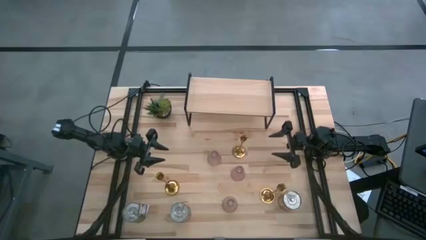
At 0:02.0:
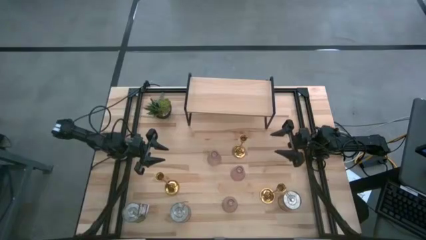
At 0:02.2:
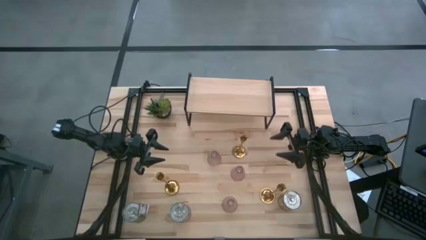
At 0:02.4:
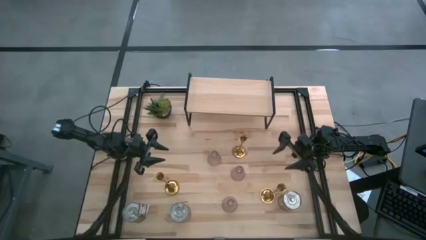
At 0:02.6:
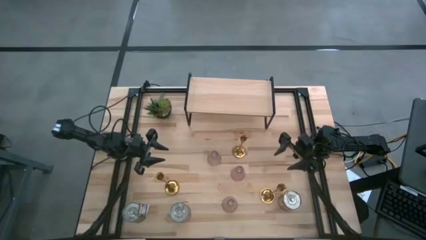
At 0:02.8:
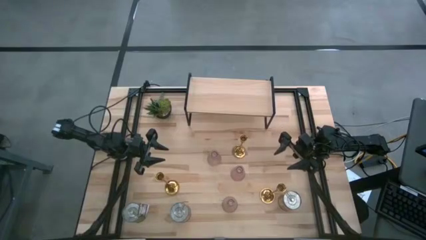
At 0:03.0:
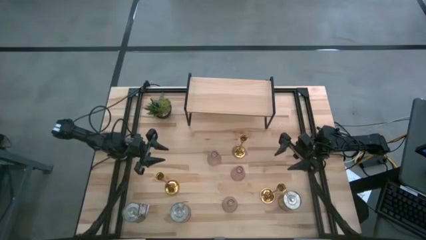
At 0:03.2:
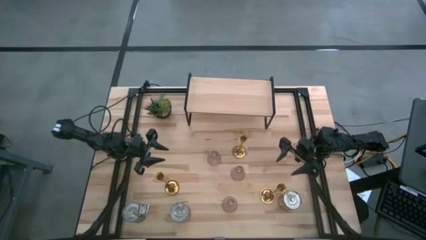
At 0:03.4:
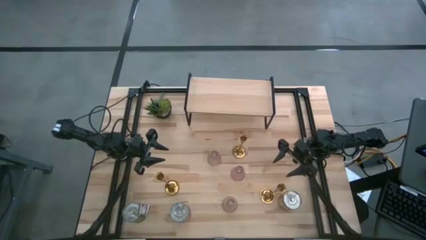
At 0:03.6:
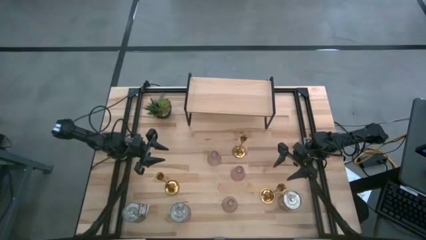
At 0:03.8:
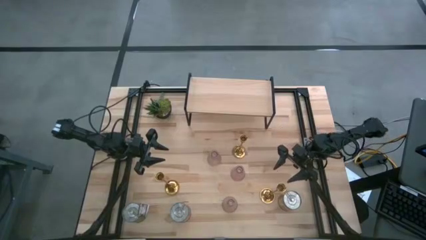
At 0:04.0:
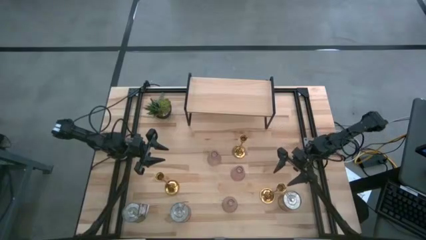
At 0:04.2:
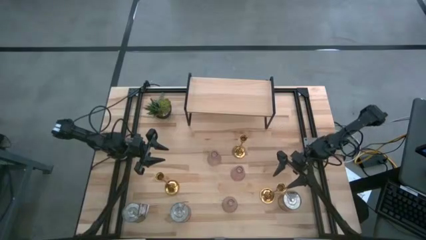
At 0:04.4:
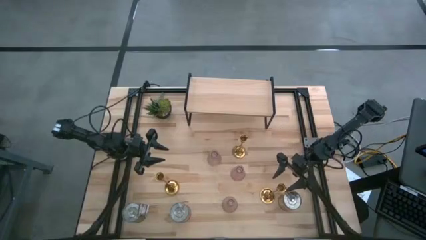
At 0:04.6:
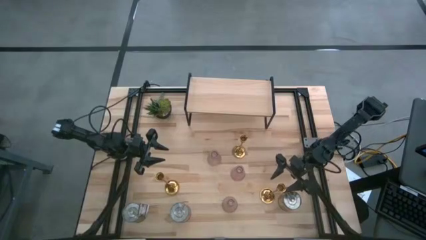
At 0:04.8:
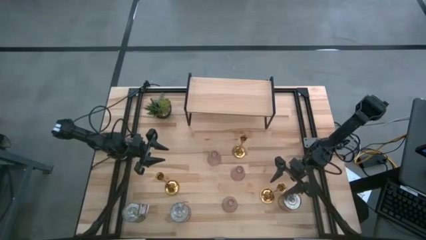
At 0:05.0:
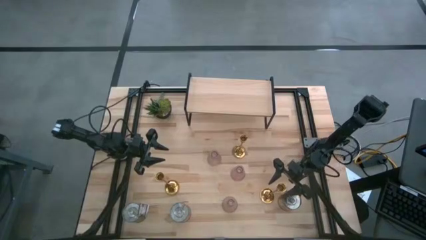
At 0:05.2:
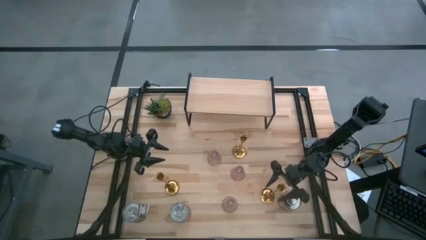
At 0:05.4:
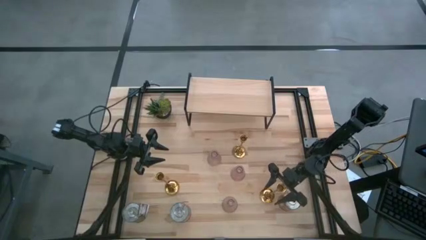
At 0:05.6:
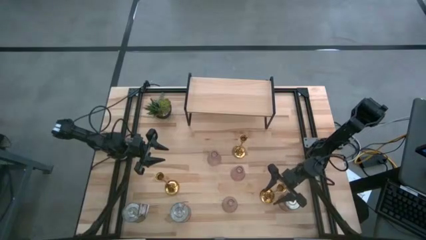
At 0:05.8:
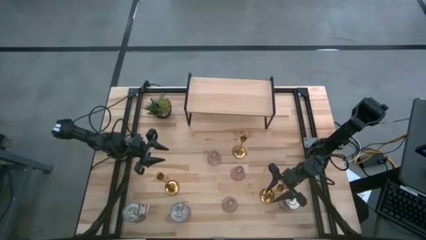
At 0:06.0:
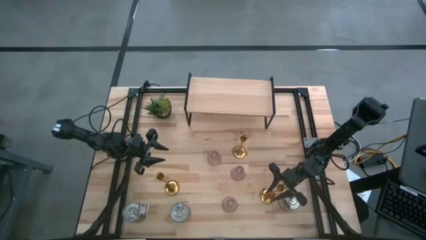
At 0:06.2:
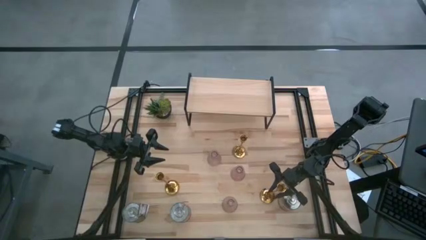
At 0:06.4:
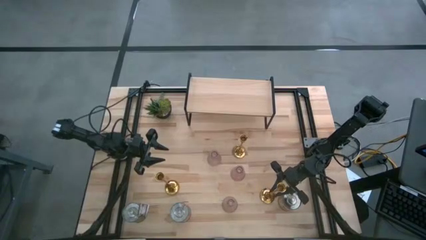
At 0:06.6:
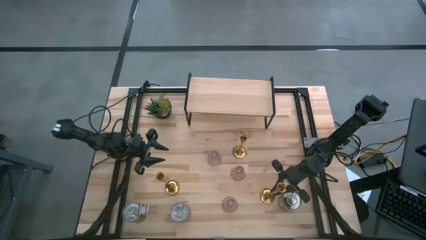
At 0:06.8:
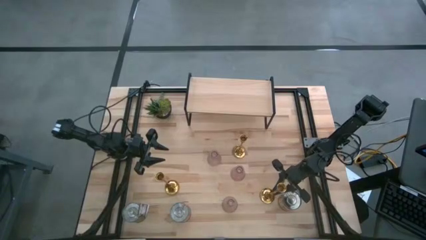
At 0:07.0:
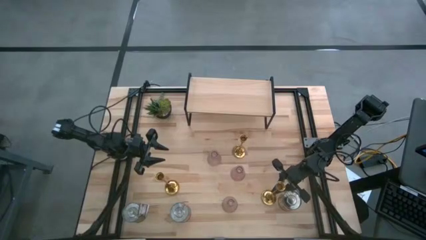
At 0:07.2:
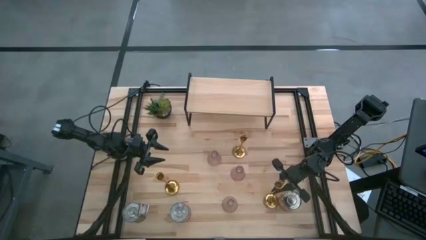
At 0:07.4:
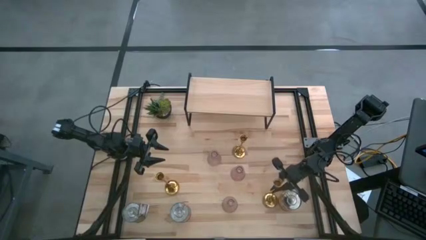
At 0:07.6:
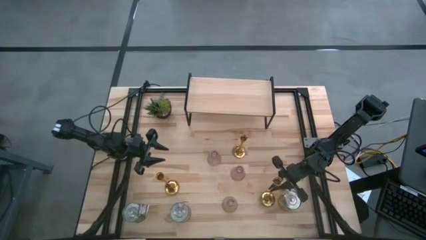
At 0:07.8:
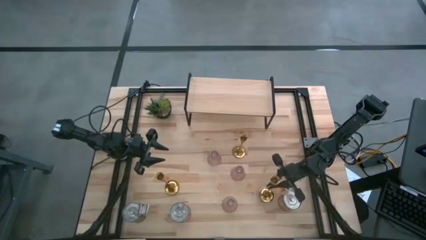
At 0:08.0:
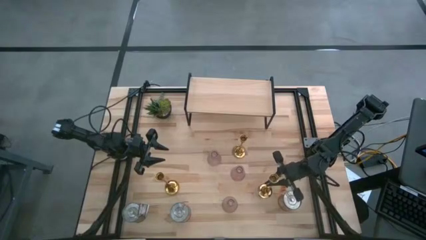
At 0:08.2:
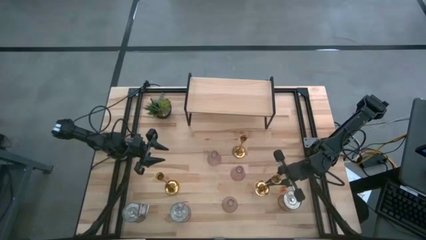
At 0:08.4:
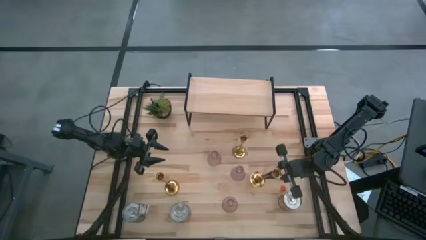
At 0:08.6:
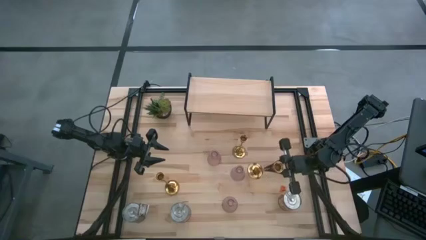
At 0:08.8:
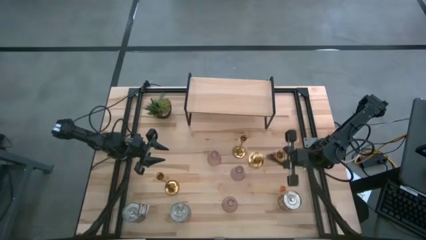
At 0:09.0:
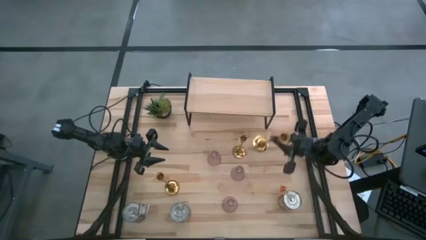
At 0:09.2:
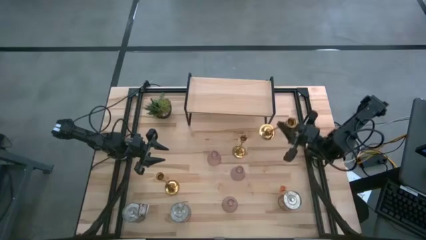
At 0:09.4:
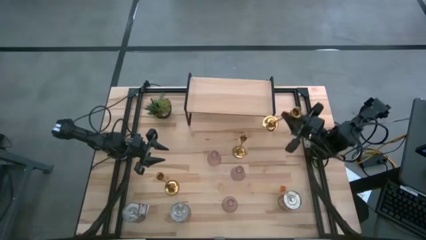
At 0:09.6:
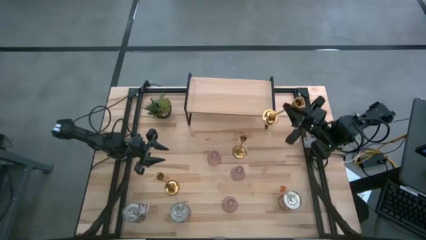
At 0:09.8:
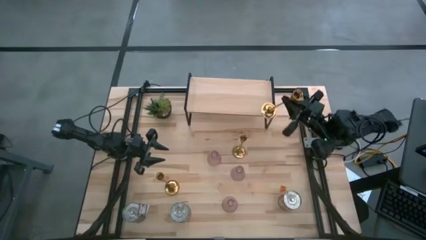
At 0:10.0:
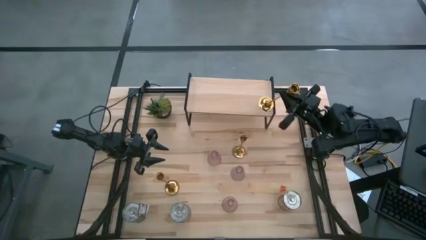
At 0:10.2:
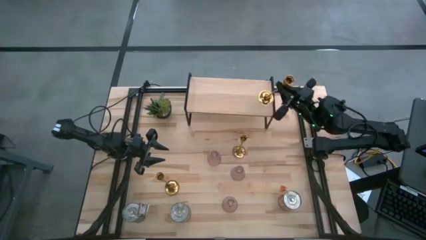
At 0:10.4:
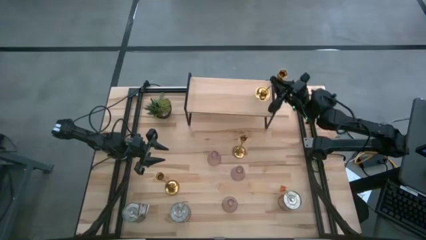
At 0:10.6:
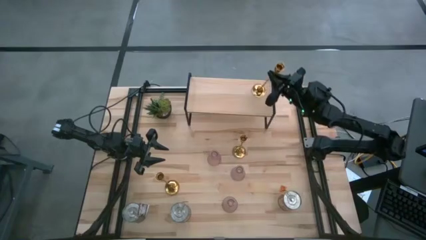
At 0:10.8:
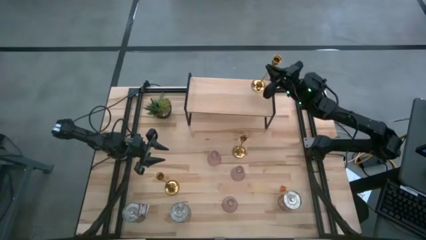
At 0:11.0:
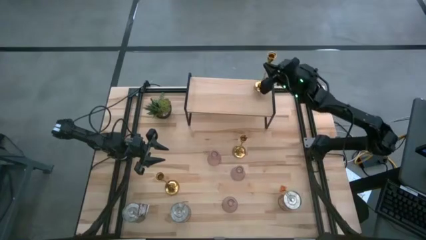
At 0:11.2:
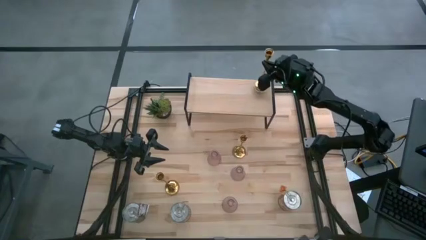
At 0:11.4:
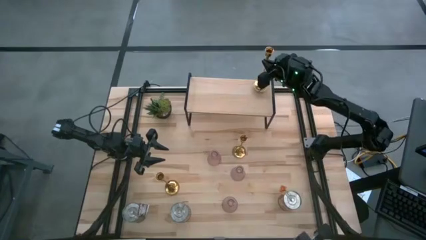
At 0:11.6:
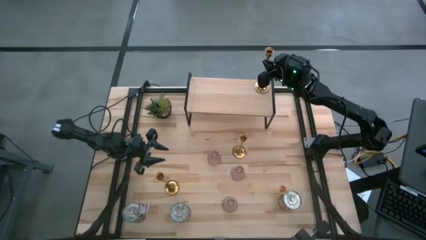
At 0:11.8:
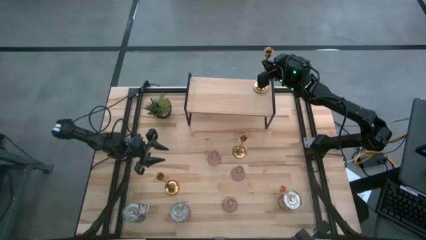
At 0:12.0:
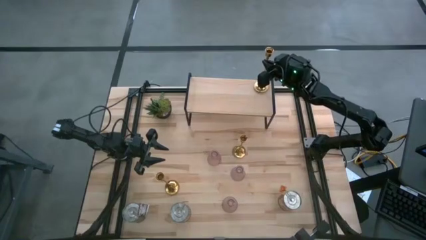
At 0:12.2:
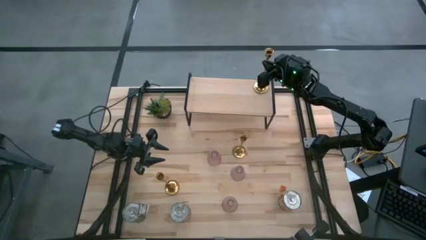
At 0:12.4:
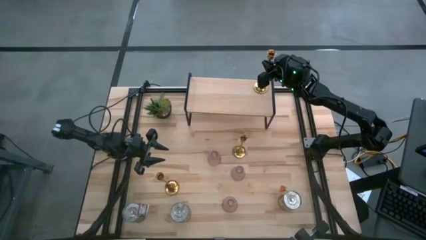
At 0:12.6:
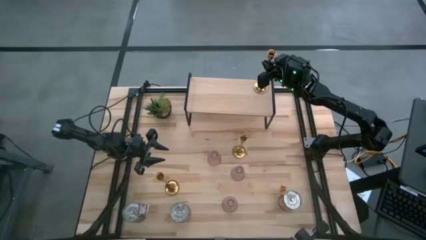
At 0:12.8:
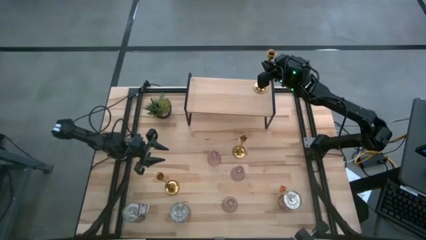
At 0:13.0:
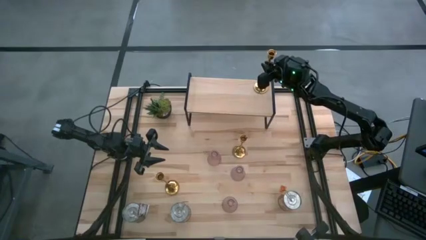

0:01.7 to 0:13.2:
Task: Pick & Place candle stick holders
Put the bottom right gold candle holder on the shelf

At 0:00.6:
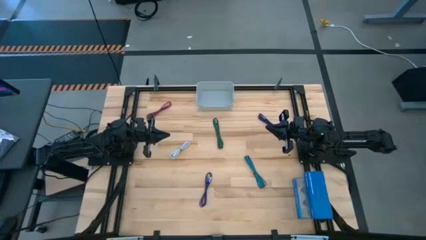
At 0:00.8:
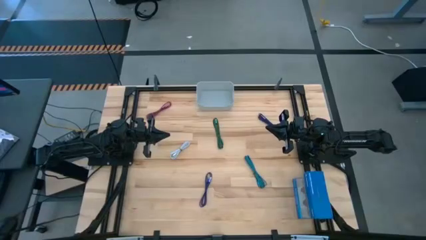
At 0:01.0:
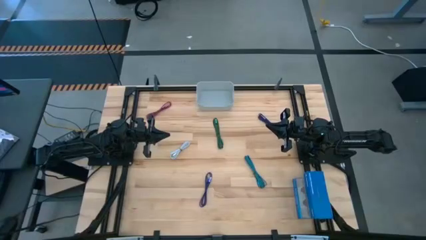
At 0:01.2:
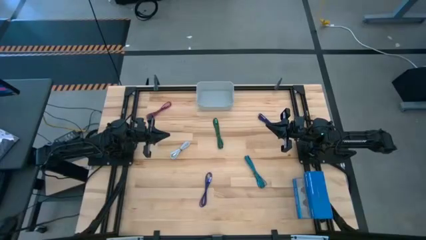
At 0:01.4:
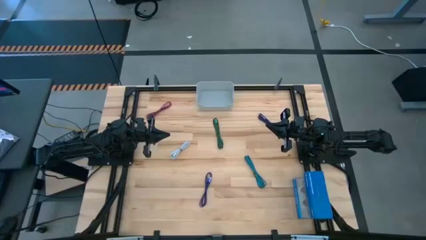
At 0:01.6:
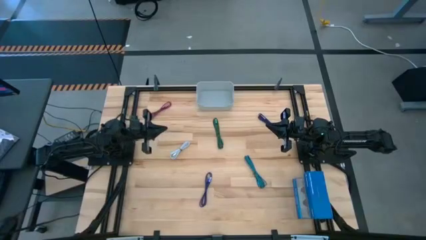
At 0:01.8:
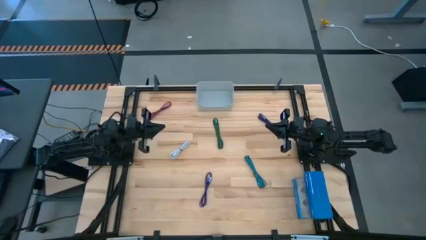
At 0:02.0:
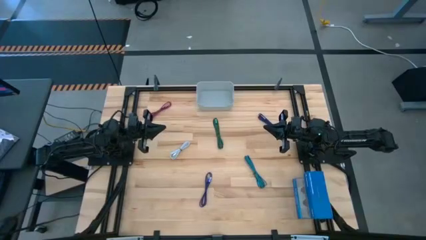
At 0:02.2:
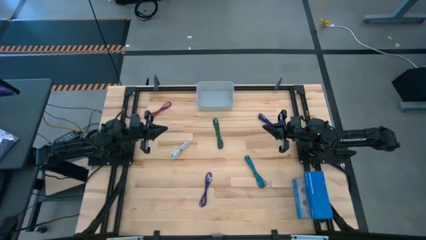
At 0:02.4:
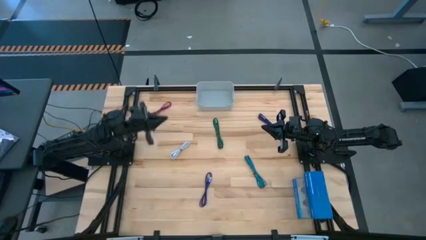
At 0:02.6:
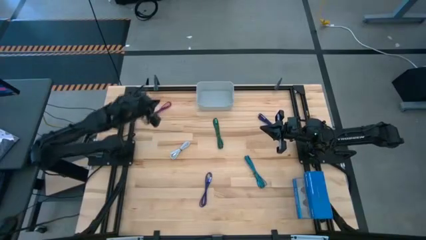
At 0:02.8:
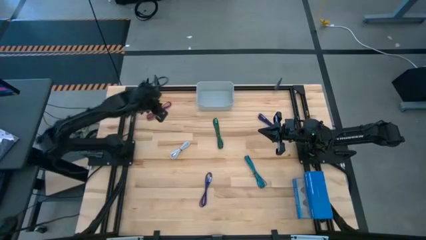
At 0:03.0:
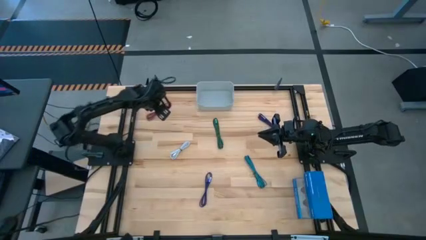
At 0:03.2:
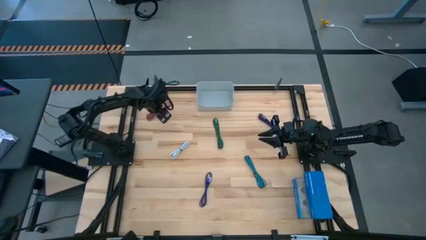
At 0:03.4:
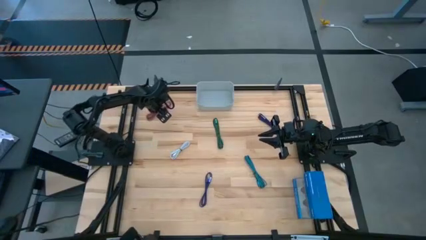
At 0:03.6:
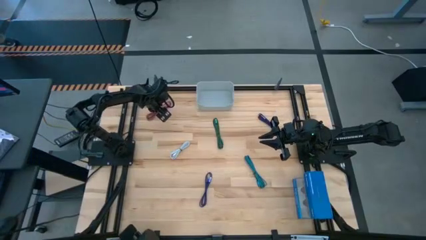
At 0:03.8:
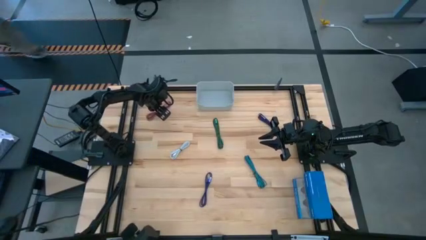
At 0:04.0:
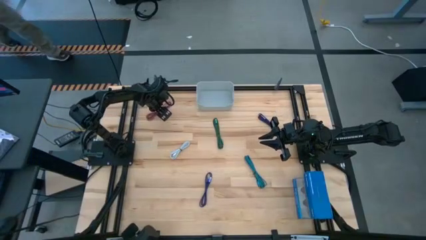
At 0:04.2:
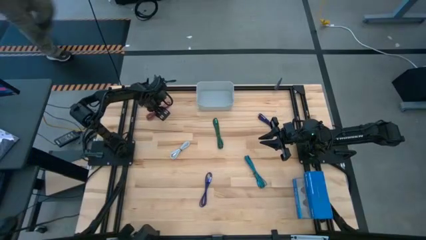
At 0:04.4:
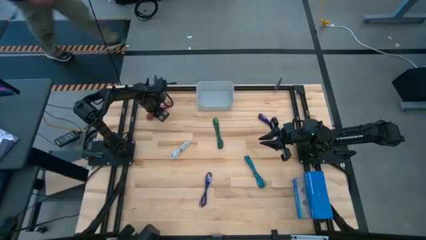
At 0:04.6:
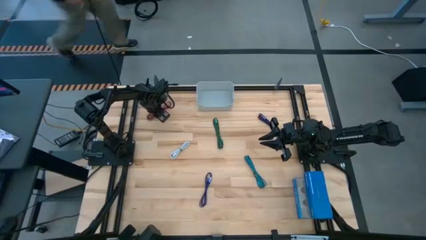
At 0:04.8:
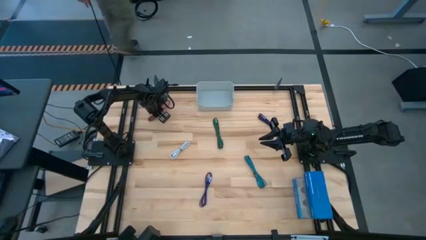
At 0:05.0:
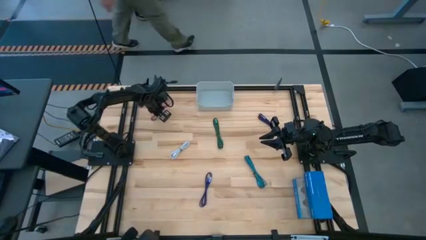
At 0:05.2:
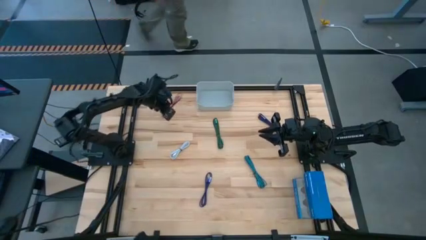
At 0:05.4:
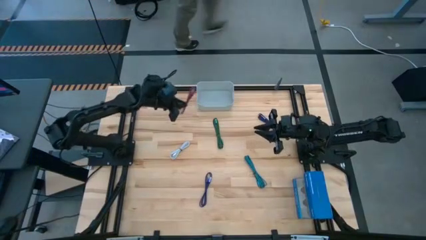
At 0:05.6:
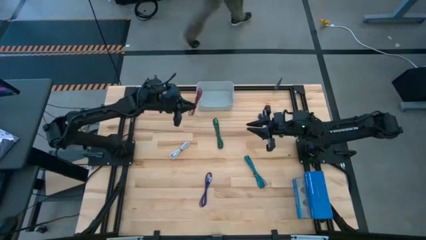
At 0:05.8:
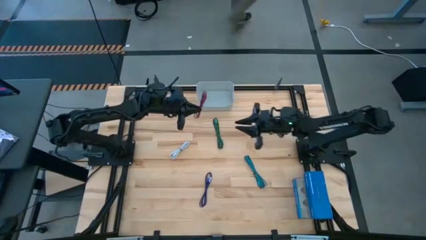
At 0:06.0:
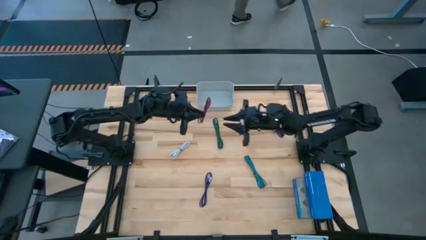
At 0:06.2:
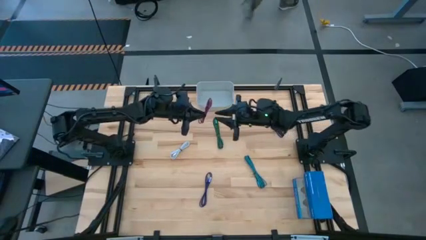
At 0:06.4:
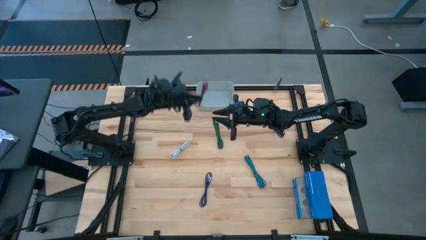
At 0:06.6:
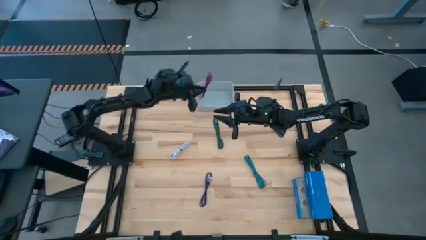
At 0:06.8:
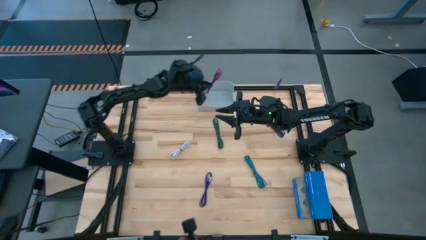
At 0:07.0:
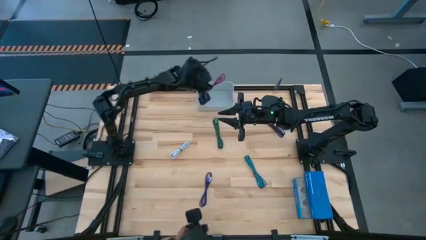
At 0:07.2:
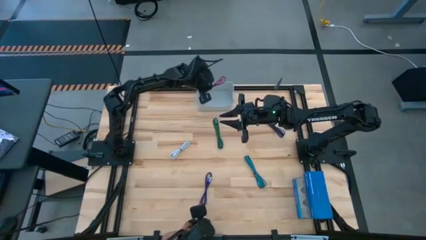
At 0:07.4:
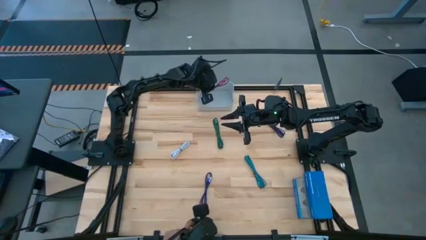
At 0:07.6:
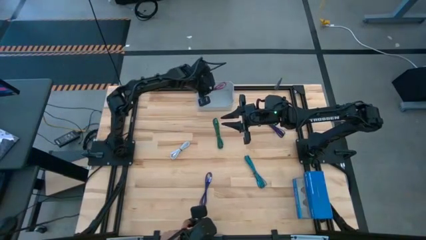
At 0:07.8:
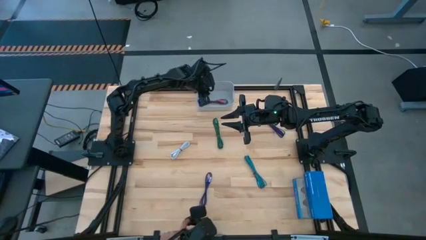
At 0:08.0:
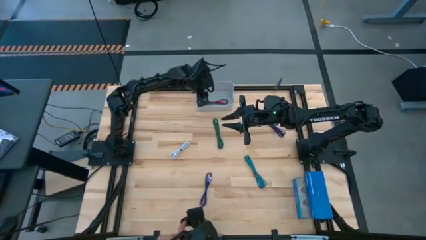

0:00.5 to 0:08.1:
Task: Pick and place USB-C Cables
Put the pink charger cable into the gray bin
